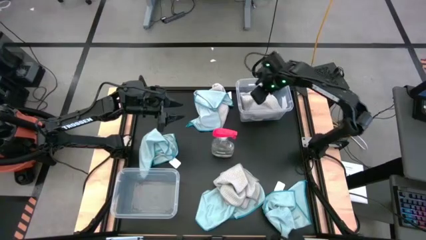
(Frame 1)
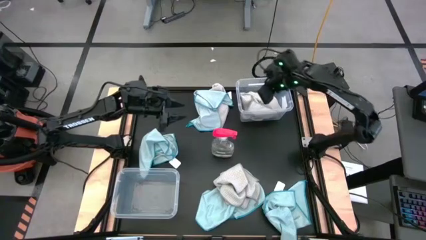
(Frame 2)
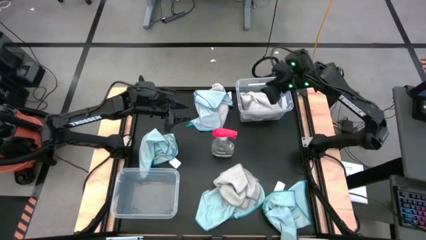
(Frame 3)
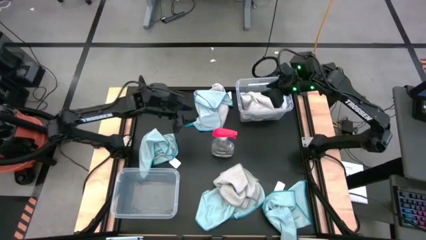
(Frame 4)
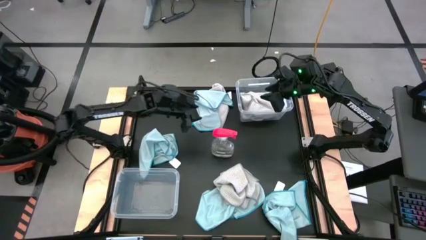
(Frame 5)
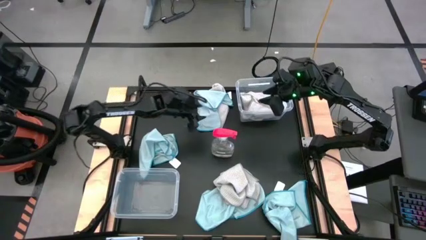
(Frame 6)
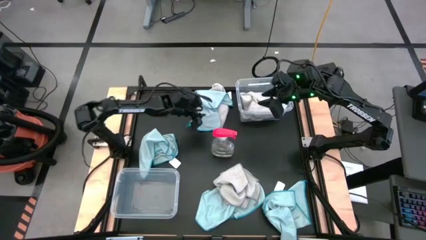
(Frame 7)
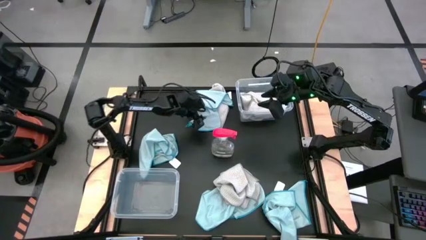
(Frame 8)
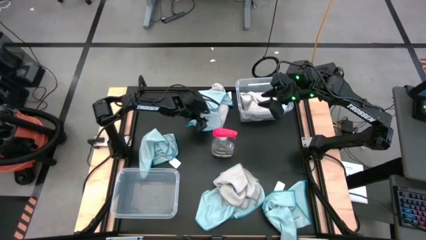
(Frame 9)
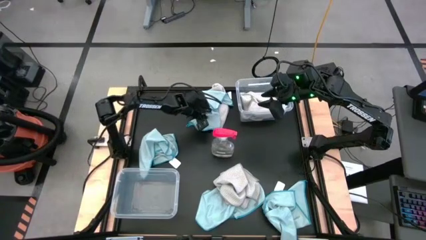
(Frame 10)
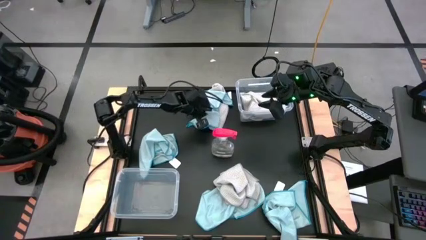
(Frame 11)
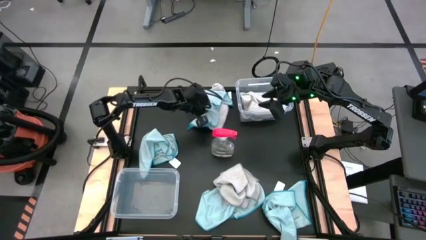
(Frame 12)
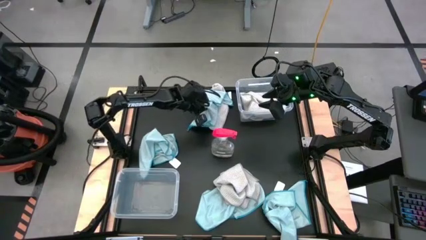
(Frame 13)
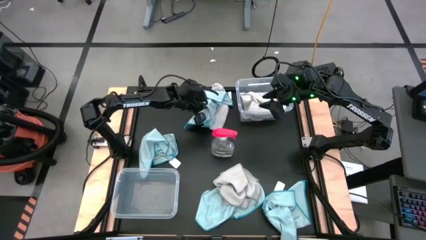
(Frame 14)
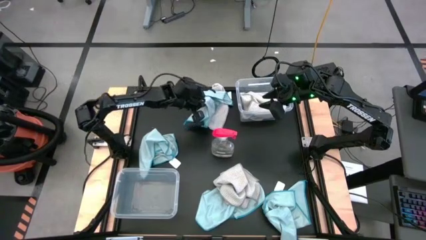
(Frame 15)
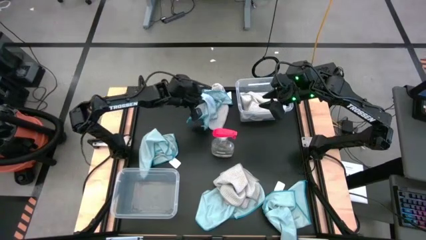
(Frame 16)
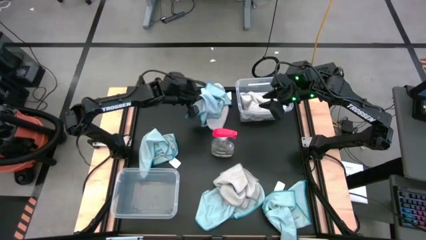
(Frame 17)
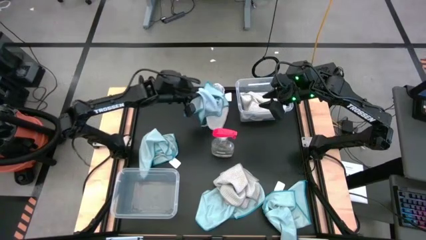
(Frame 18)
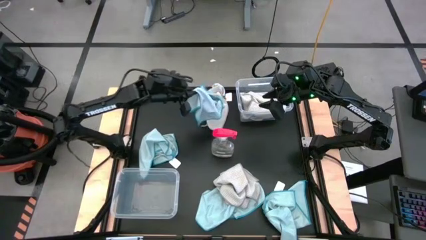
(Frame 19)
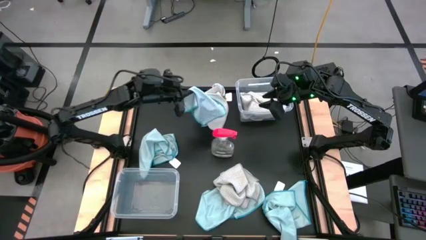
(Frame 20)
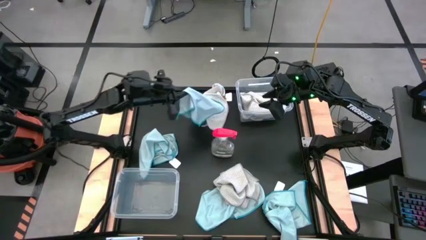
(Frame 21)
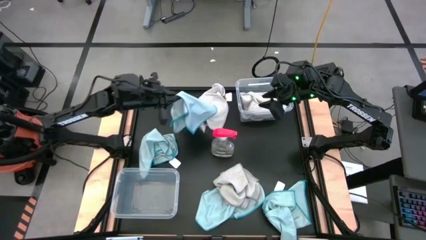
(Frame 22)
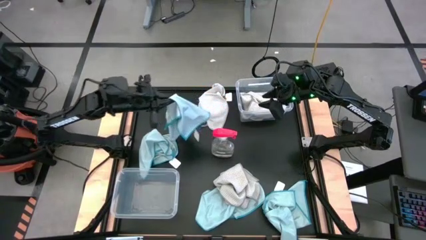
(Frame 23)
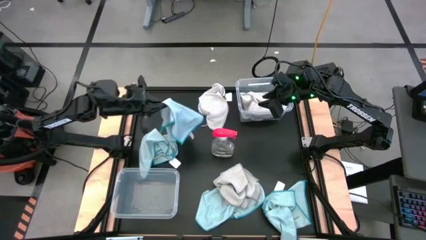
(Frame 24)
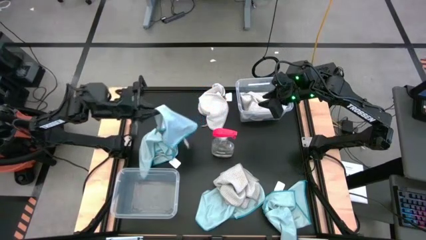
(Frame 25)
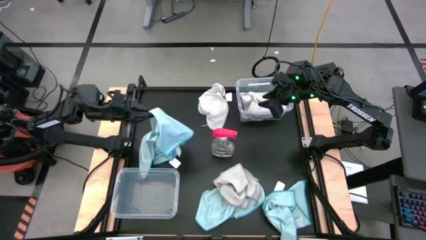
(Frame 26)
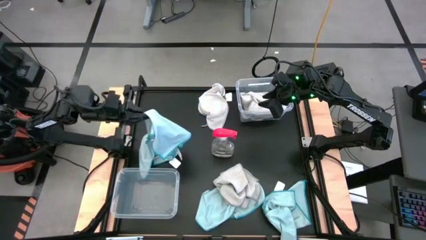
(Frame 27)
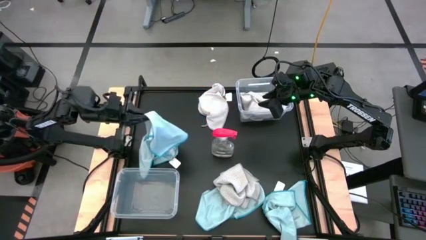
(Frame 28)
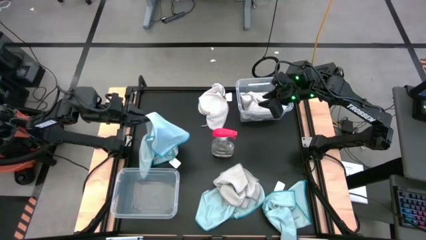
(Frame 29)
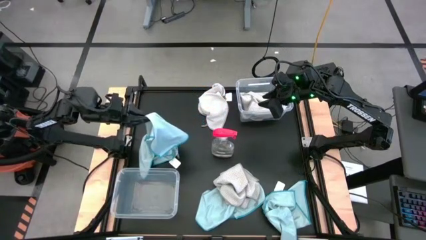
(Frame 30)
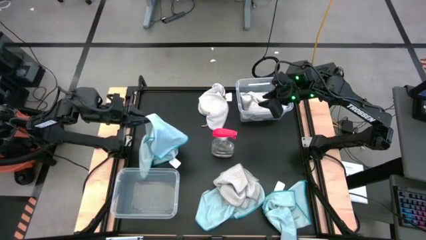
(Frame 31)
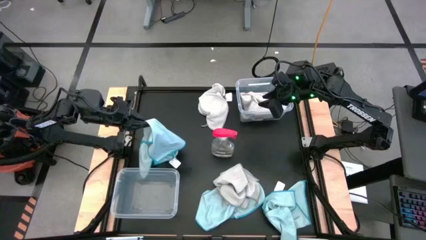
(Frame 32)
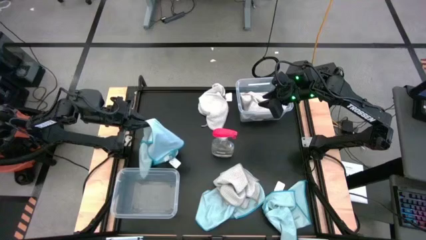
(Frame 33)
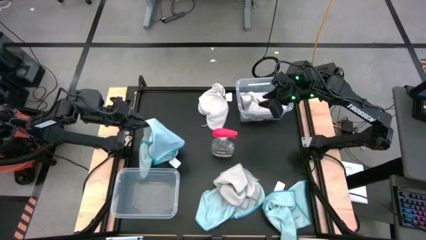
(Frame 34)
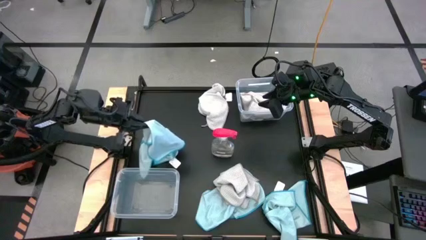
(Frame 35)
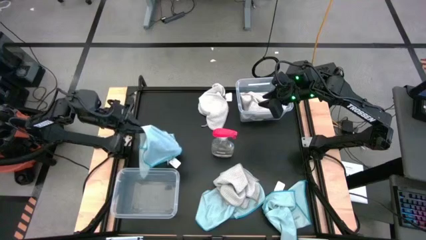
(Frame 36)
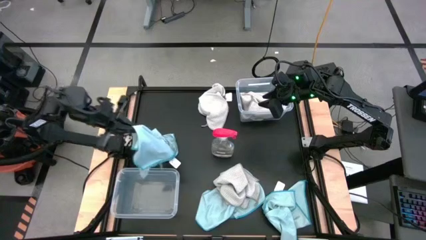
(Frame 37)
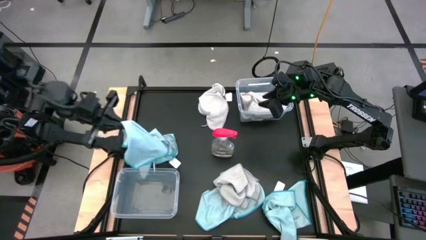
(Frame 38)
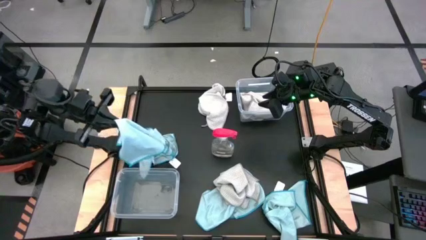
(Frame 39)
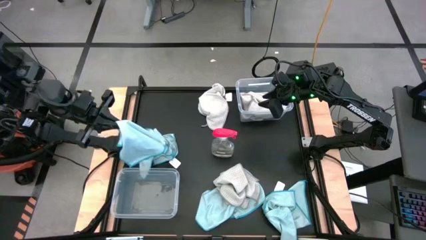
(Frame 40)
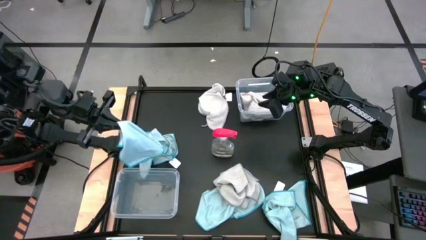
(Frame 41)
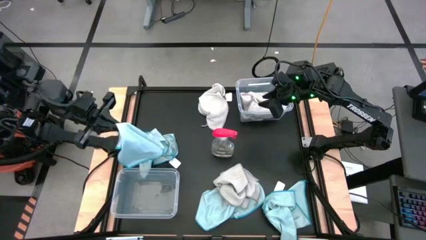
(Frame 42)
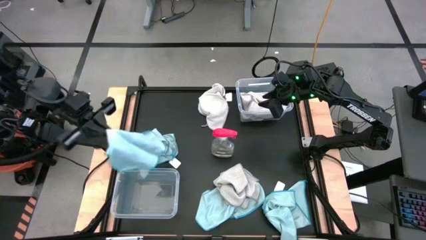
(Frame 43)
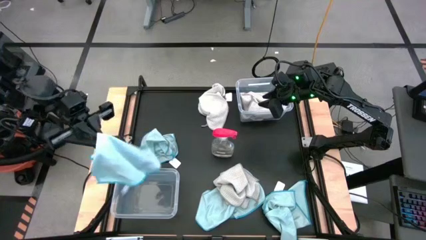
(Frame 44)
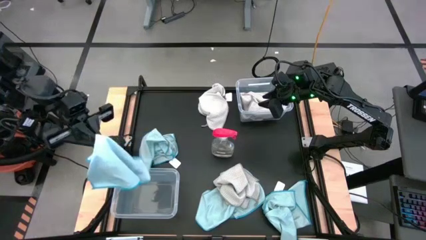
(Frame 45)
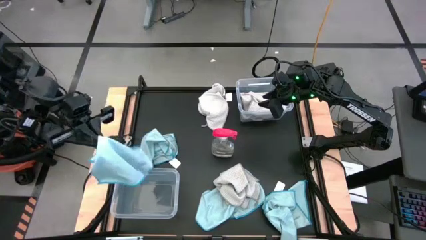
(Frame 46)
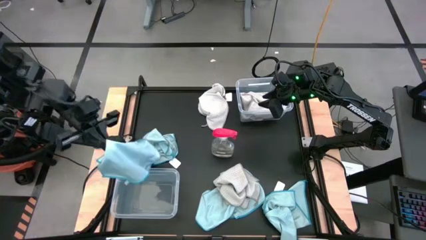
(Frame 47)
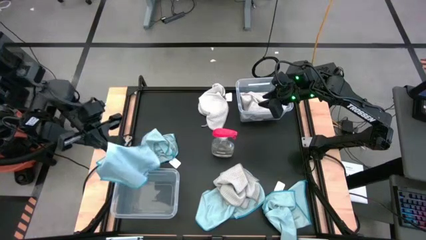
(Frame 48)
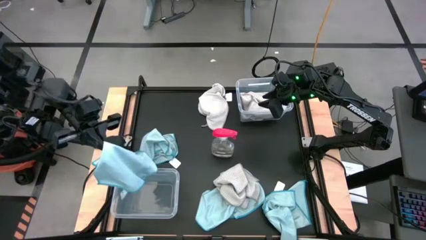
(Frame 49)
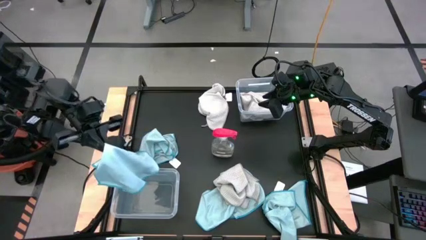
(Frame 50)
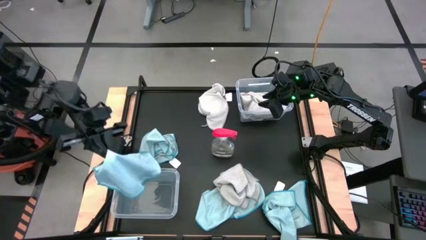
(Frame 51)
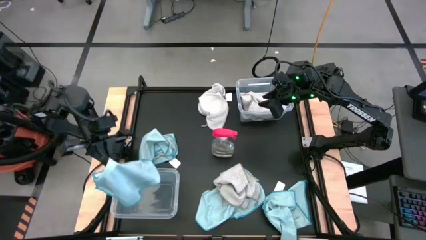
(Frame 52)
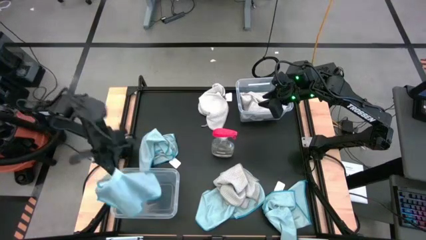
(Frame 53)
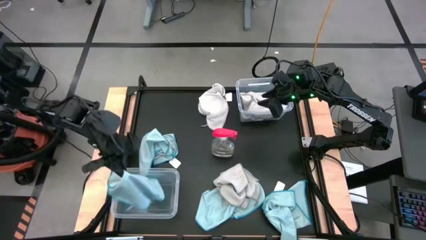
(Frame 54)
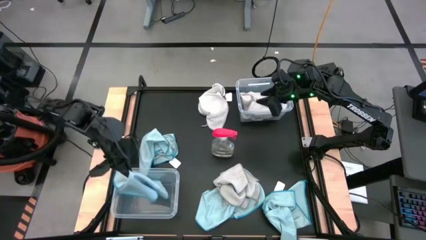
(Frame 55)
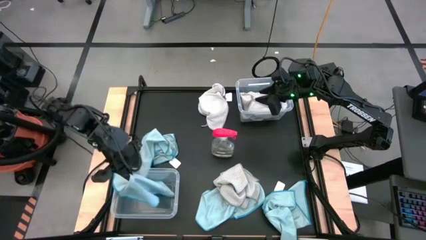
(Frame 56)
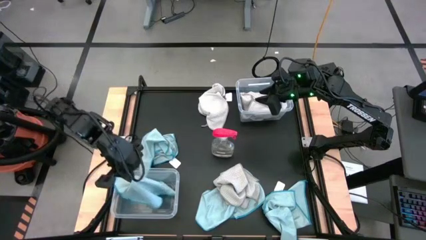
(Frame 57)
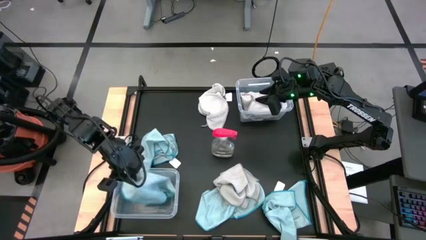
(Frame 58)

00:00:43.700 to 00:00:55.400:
Task: Sort microfiber towel by color & place in baskets
Put the blue towel into the bottom transparent bin

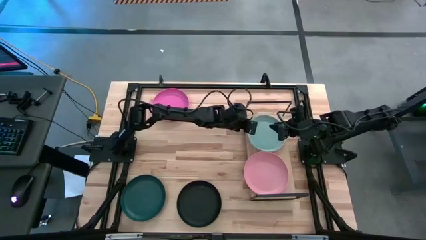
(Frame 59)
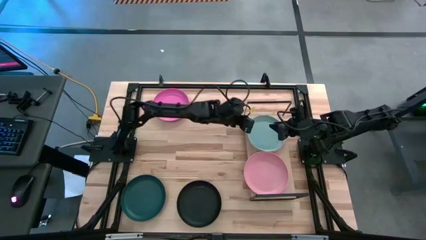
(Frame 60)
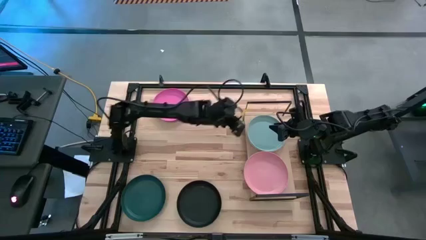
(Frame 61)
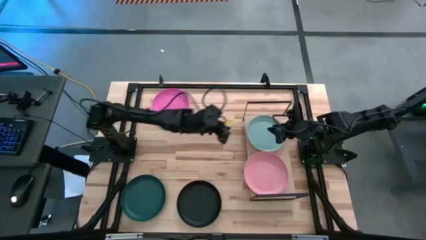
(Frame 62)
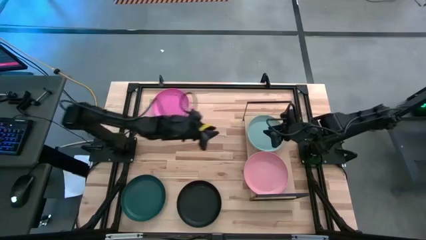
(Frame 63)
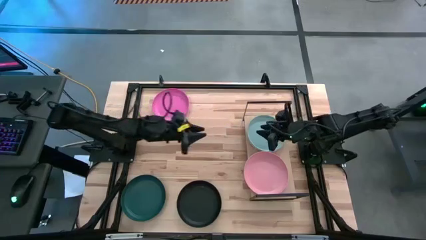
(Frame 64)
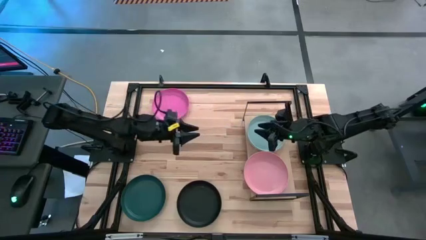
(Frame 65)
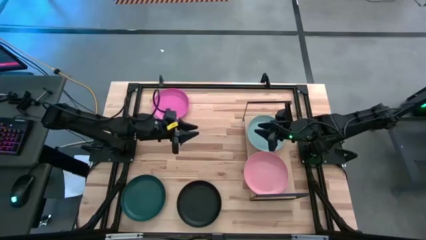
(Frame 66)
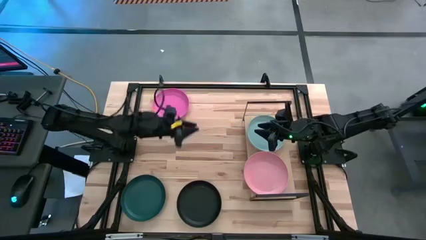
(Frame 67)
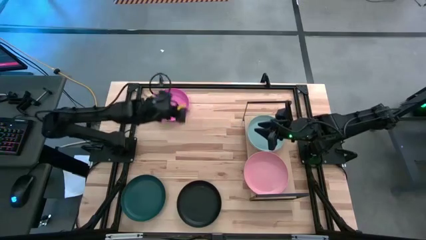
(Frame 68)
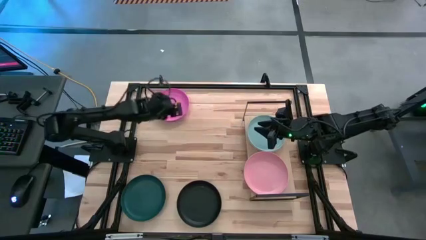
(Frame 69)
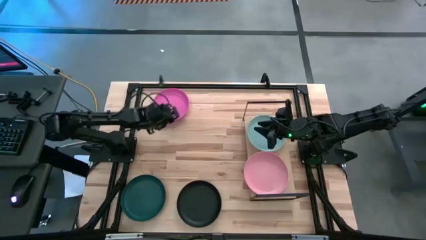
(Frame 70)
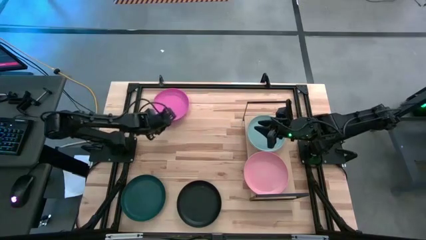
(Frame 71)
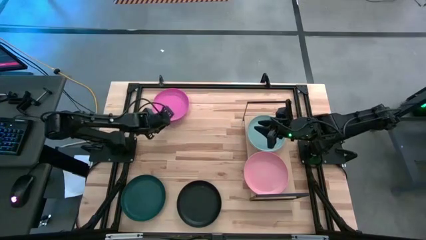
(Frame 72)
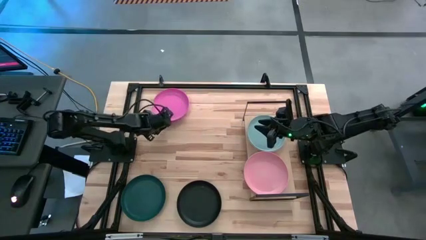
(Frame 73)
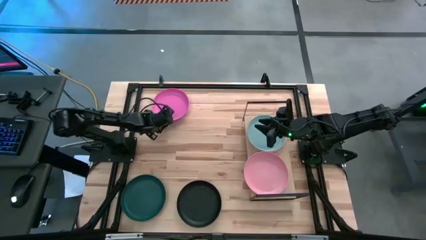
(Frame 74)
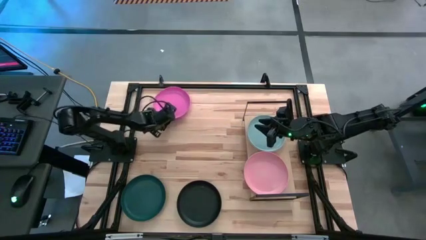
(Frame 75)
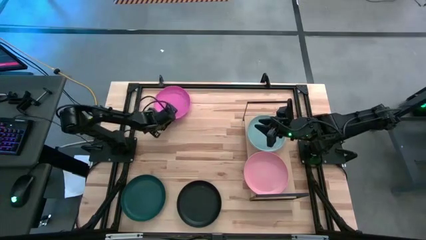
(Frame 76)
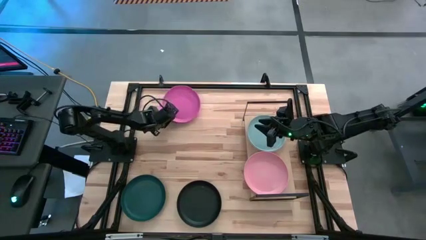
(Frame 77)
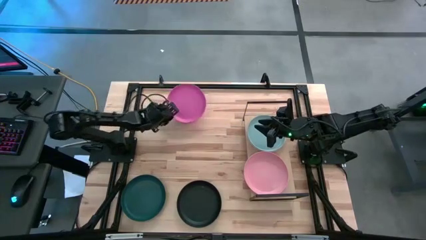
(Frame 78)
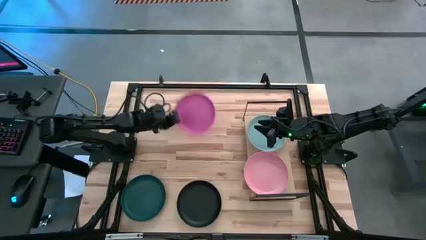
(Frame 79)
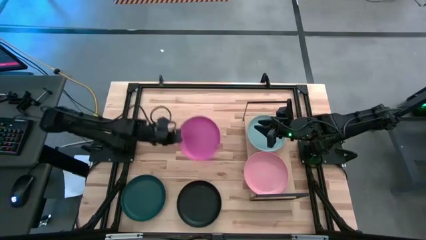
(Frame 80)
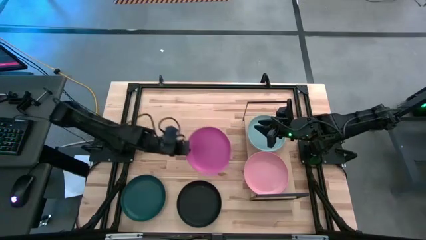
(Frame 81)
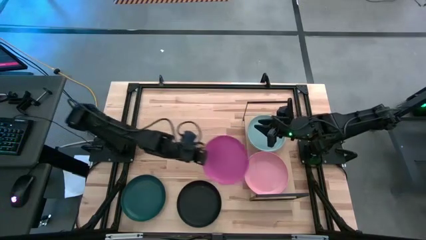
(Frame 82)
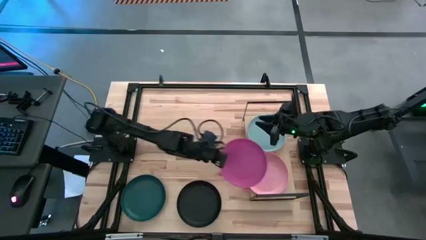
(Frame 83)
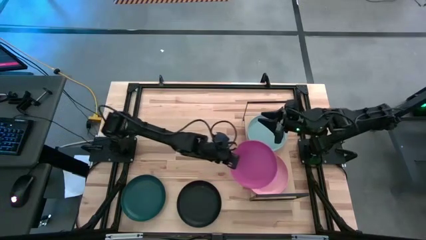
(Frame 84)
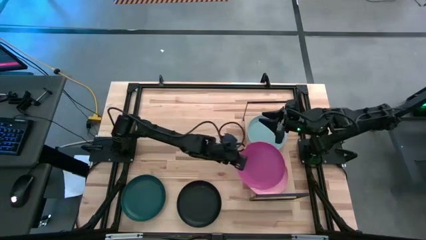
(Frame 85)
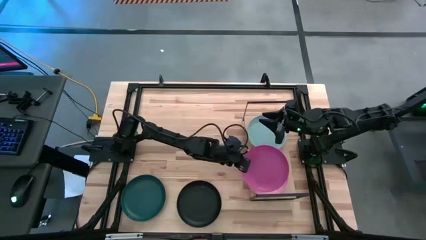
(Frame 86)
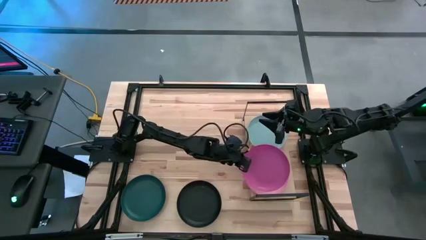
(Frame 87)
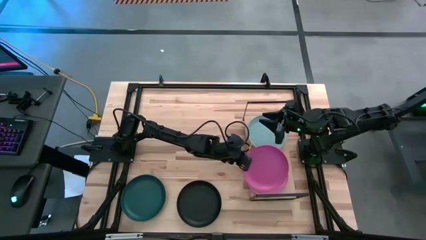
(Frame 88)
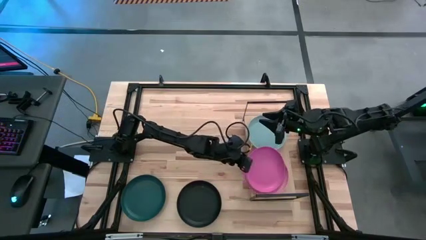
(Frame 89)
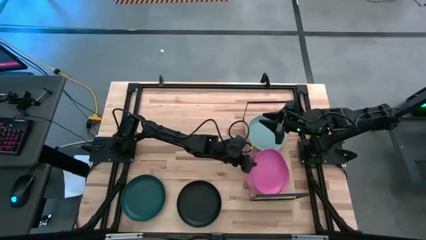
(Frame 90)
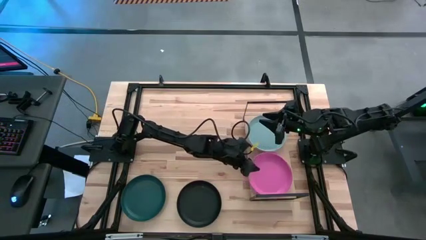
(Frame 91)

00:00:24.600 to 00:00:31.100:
Task: Place and stack plates onto a shelf
Stack the dark pink plate on top of the light pink plate on the shelf
